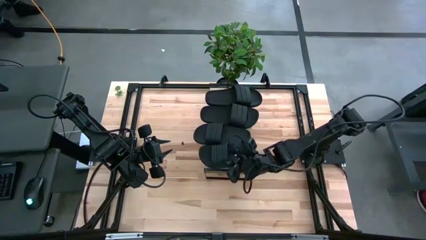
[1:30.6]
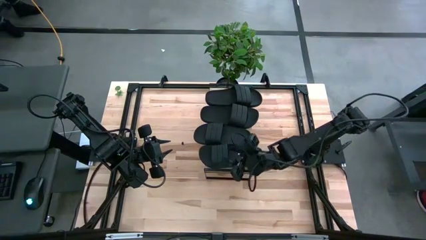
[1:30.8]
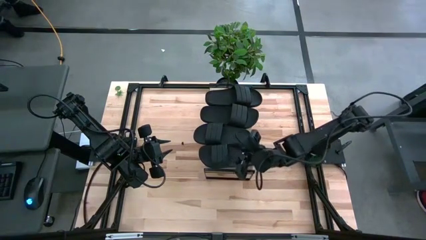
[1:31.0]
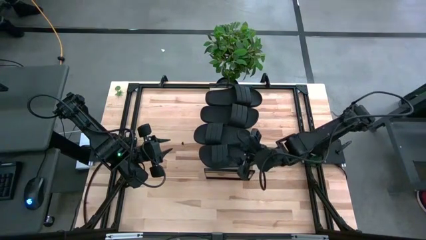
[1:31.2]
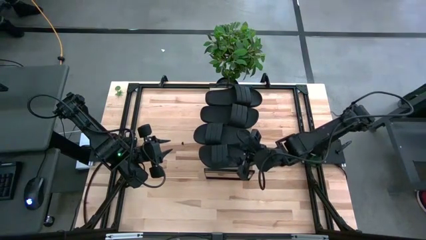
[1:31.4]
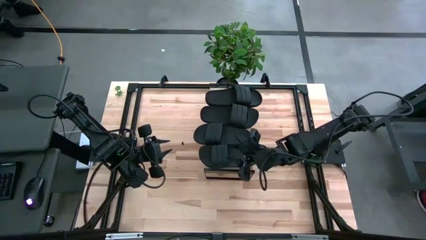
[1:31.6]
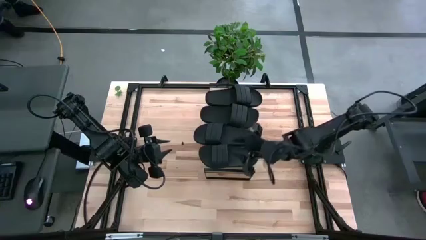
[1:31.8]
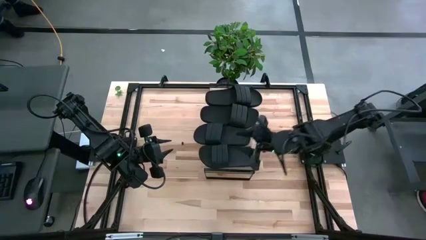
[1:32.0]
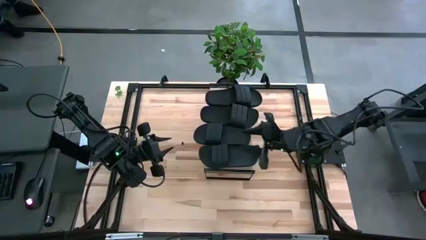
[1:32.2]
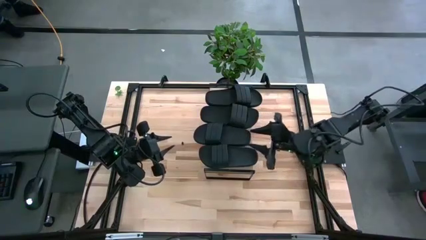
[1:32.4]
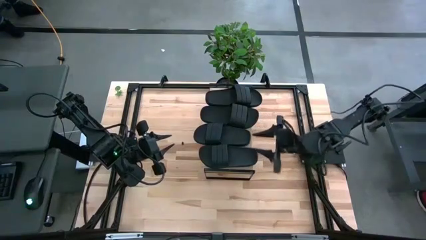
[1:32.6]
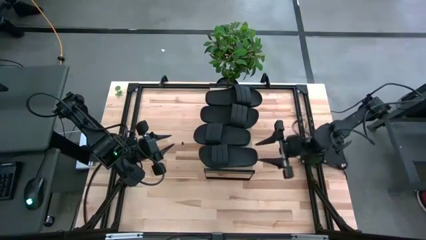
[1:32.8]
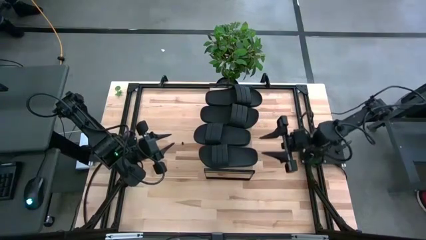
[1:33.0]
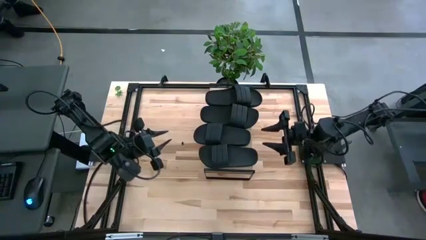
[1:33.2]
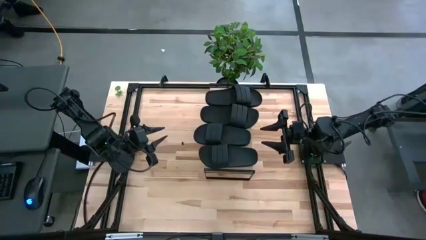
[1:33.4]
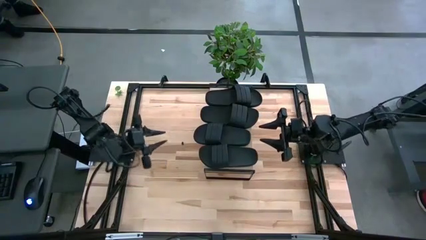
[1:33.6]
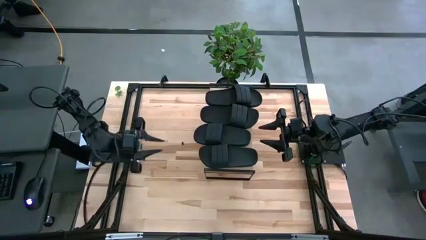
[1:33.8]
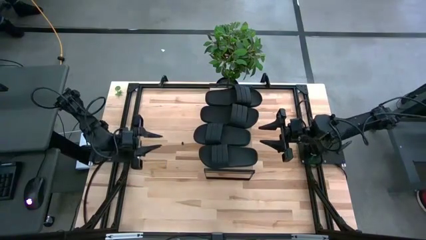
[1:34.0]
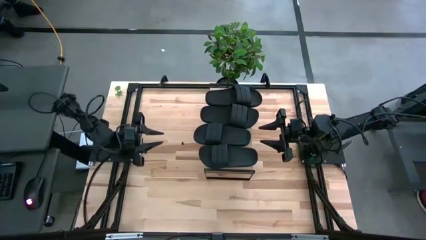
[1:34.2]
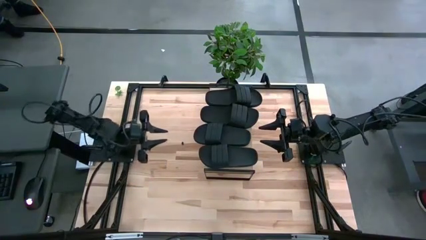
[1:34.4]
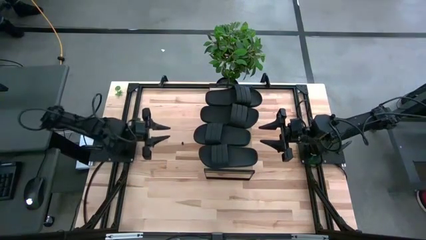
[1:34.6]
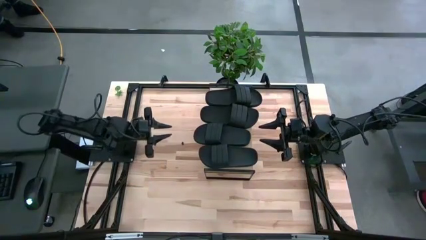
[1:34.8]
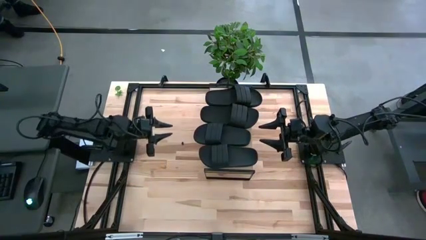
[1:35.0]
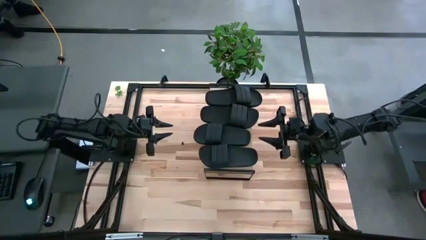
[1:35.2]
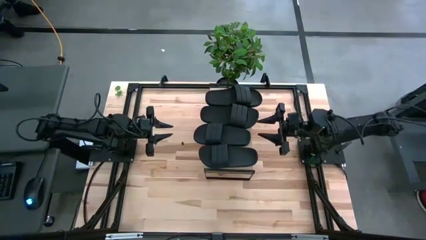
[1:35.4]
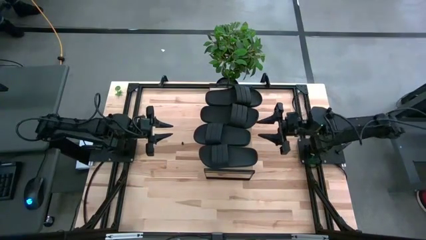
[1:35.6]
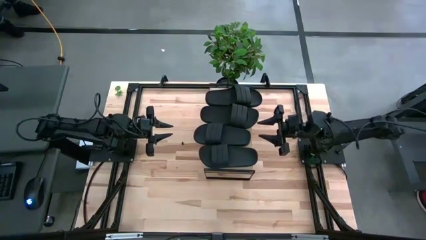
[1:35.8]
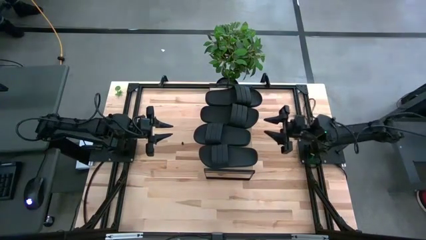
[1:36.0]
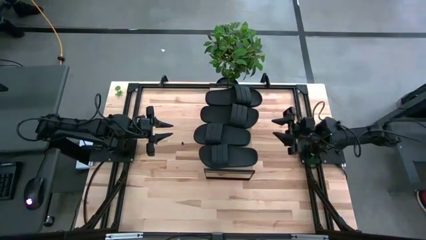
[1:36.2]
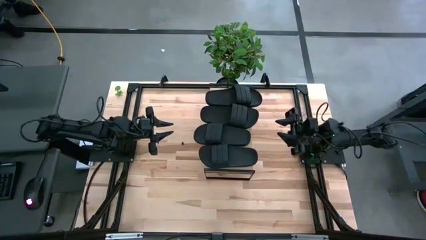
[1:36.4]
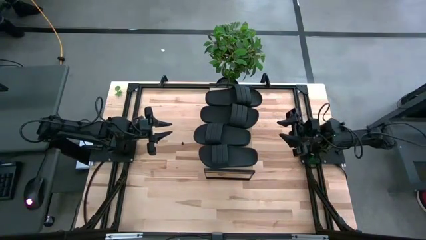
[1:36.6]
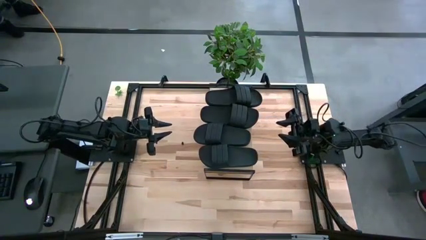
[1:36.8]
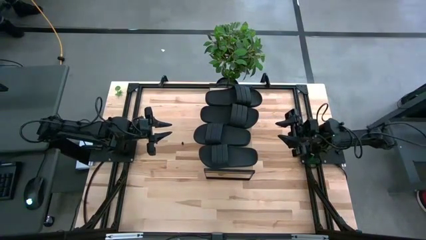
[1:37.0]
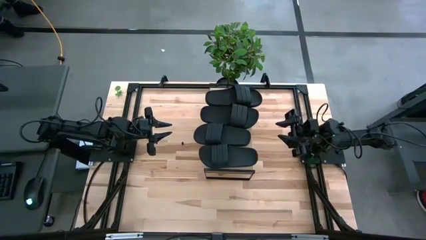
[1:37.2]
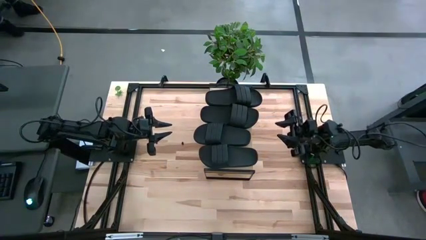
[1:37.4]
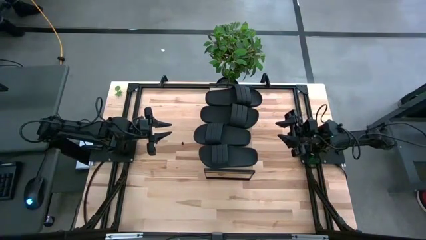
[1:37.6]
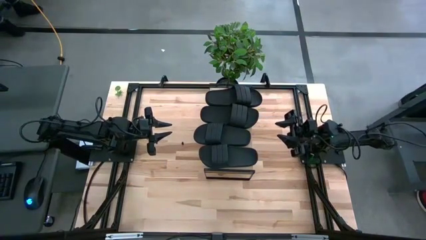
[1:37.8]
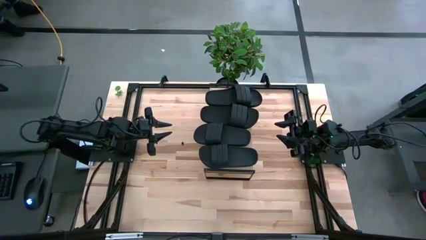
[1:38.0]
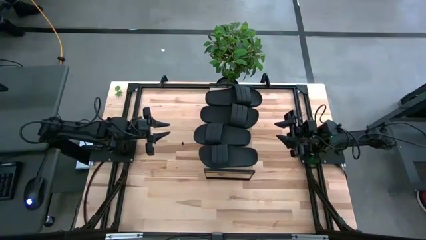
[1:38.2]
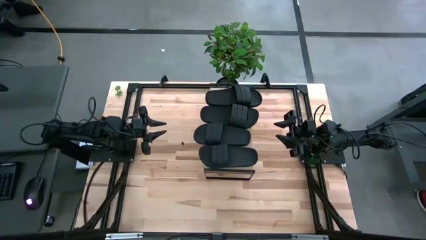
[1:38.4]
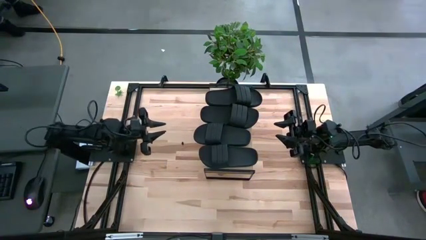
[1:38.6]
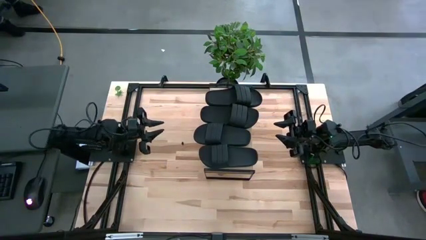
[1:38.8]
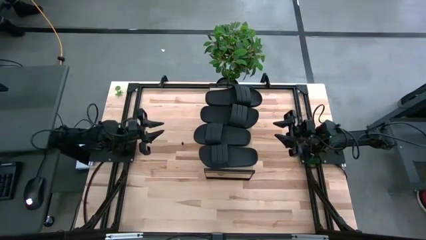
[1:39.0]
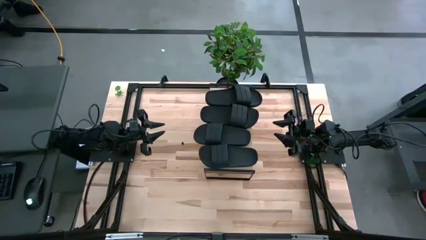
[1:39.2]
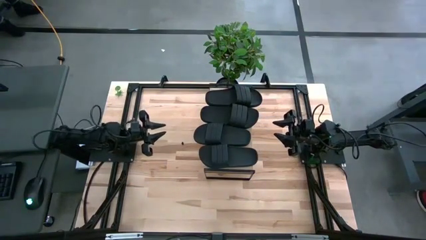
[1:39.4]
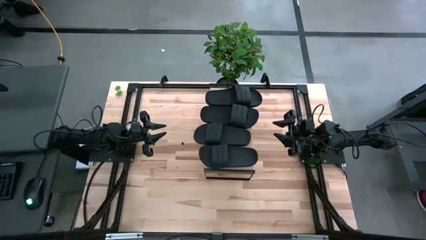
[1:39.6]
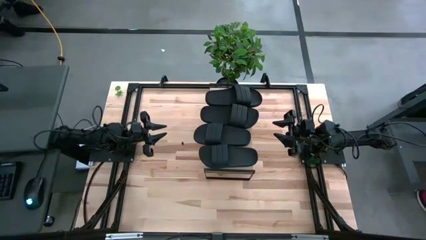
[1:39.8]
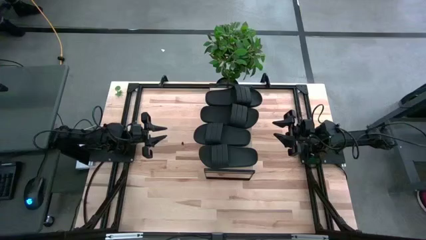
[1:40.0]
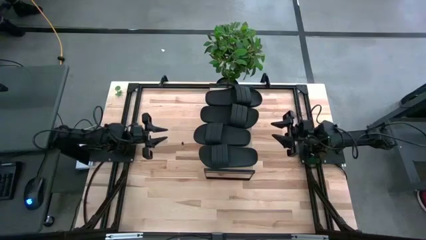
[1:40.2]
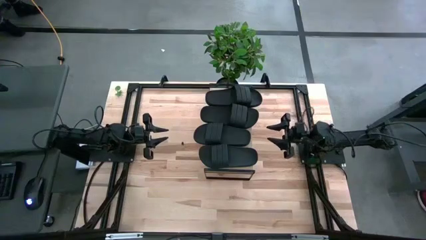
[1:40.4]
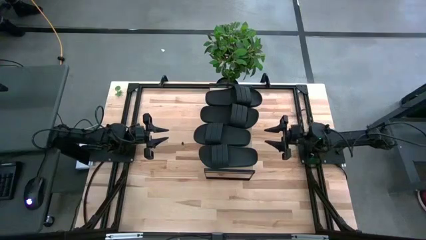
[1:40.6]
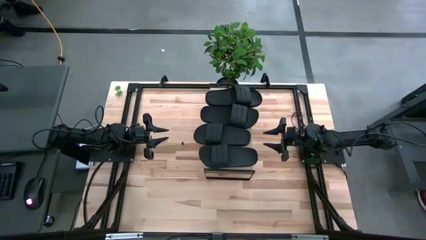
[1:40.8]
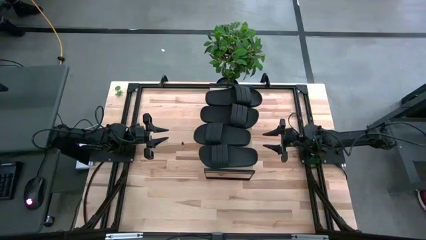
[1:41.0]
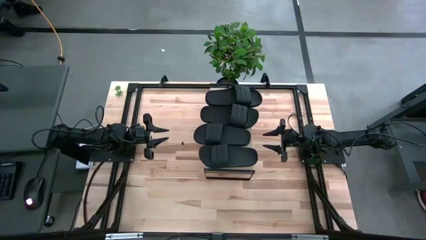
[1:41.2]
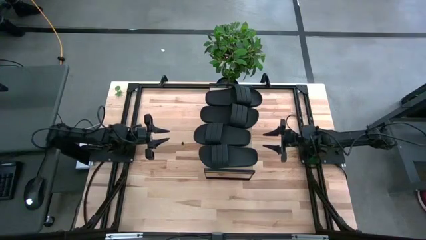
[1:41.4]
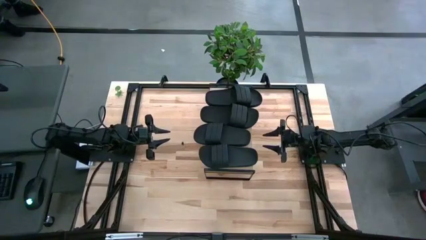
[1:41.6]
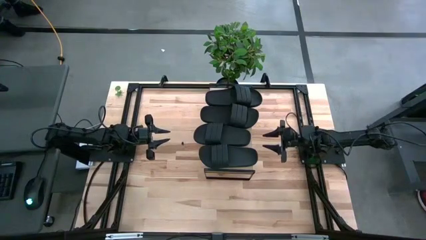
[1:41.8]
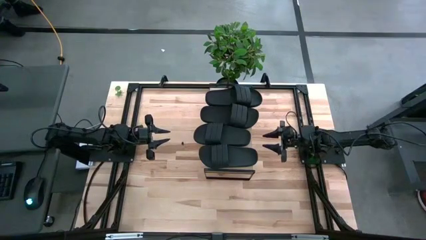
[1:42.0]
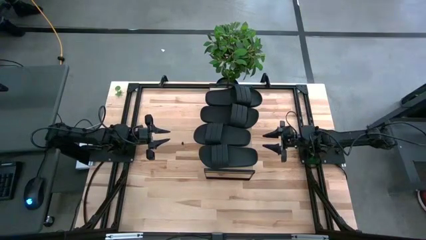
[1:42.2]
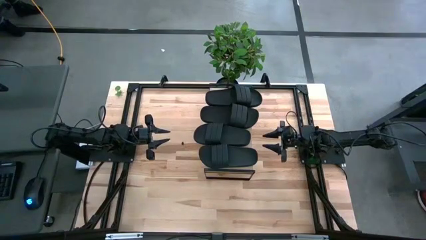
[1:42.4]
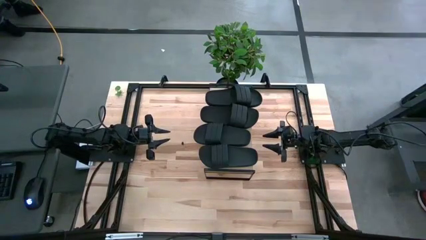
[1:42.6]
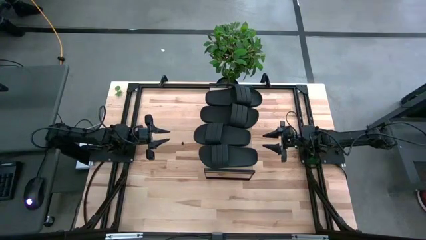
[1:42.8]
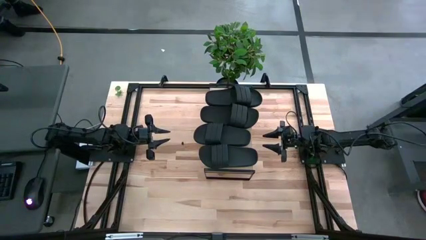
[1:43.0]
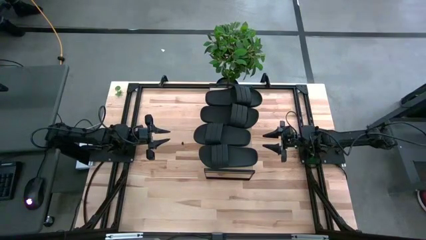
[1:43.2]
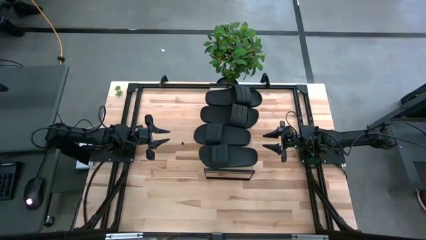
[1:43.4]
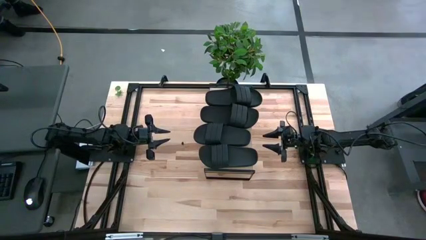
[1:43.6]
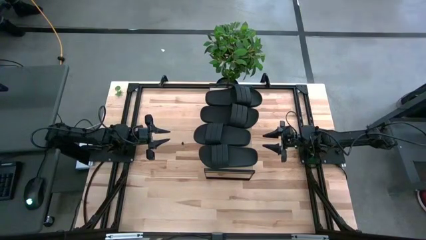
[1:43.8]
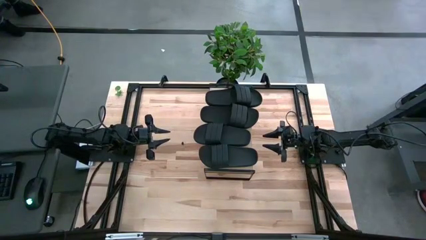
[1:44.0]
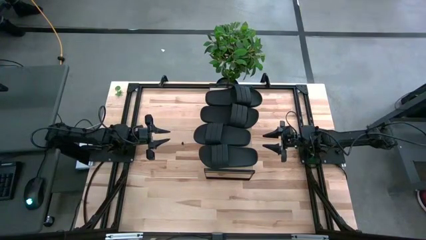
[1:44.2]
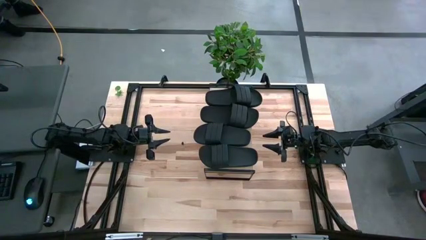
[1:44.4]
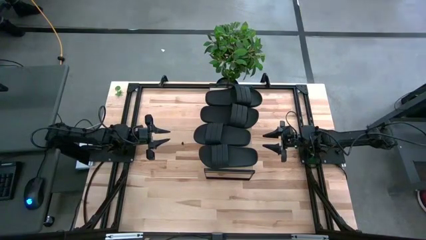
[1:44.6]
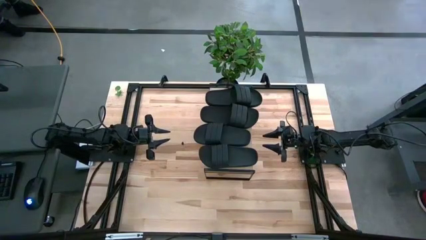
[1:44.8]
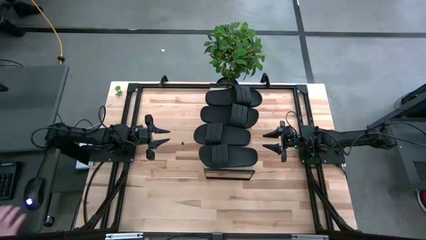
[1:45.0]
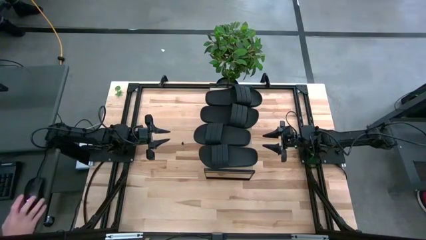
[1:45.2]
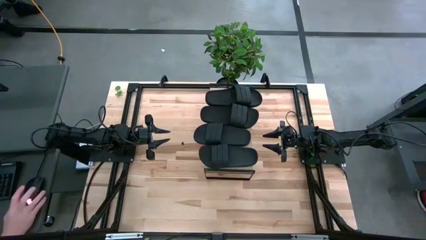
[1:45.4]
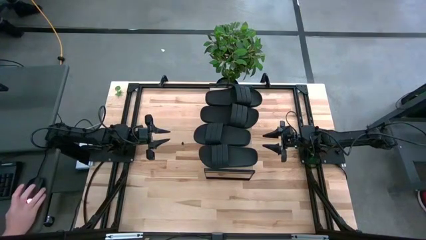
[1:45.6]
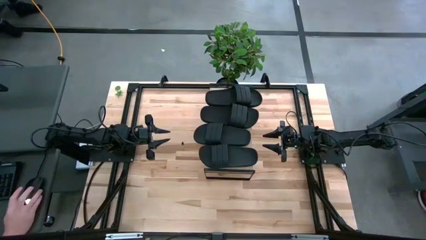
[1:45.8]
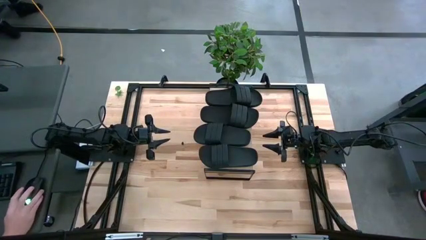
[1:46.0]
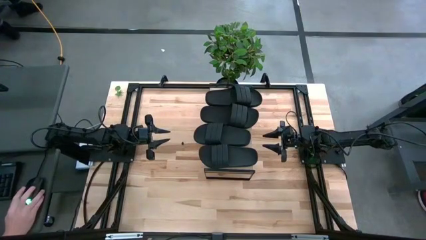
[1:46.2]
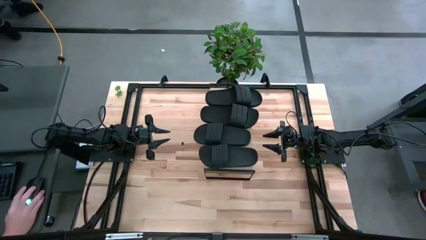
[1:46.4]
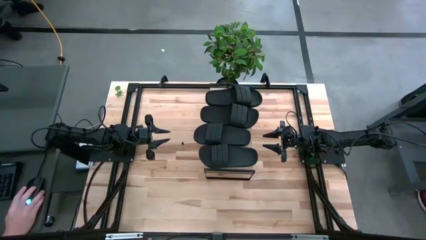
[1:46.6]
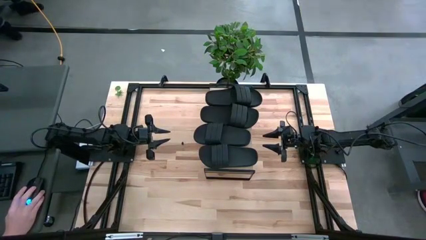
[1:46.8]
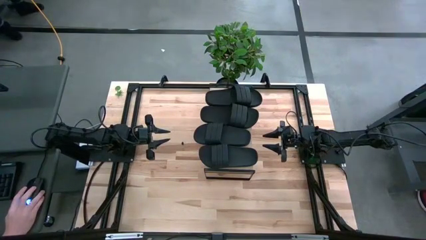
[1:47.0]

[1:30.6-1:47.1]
Task: Pick and place slides into the shelf
Return to Home Position
